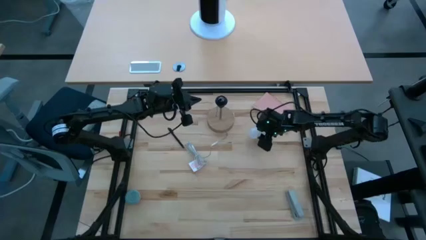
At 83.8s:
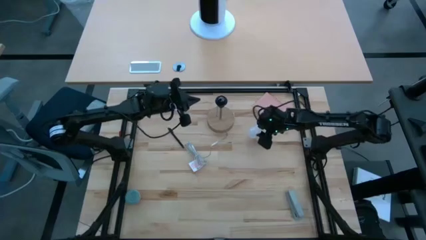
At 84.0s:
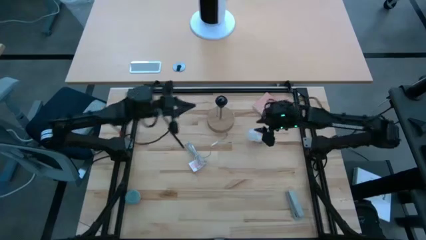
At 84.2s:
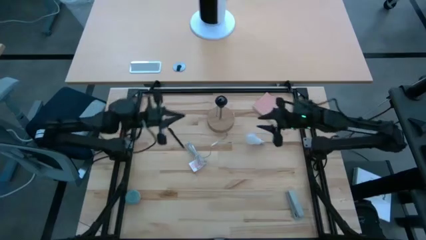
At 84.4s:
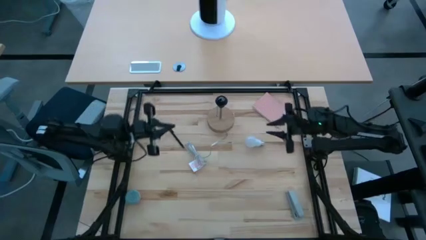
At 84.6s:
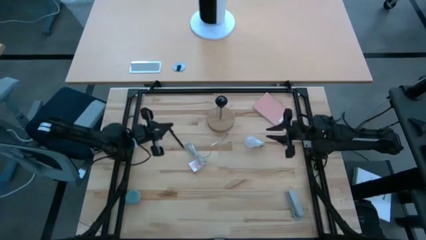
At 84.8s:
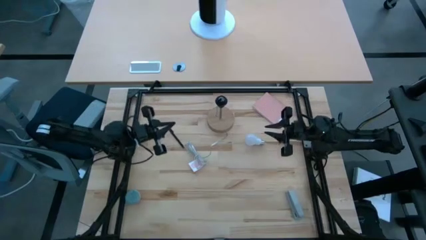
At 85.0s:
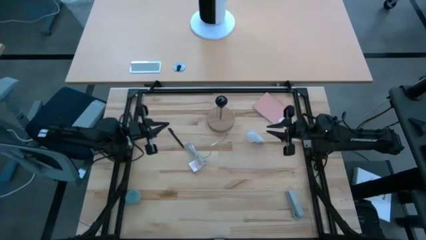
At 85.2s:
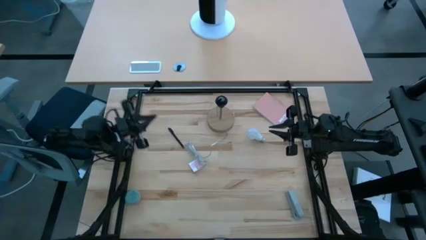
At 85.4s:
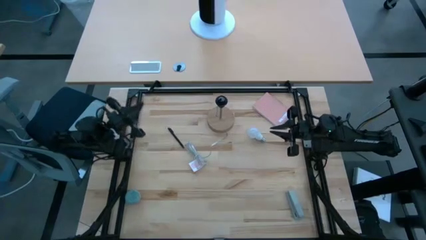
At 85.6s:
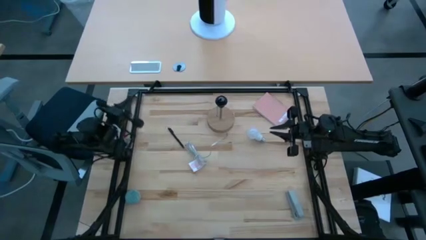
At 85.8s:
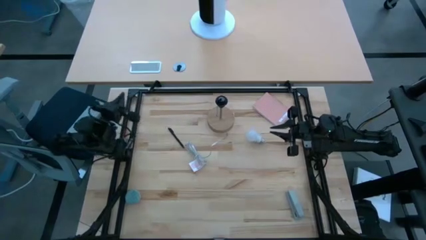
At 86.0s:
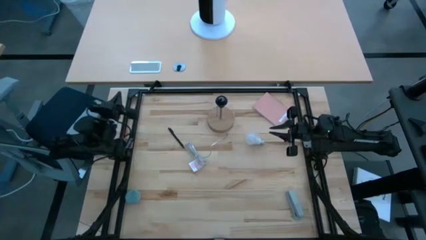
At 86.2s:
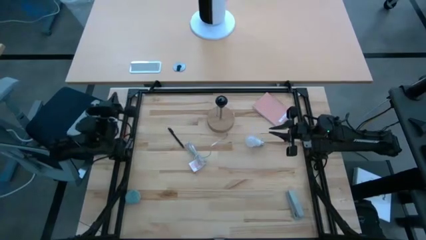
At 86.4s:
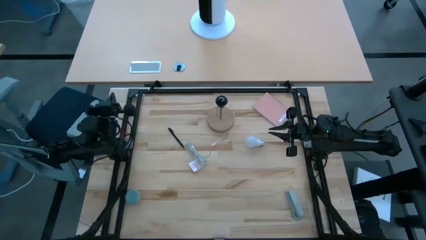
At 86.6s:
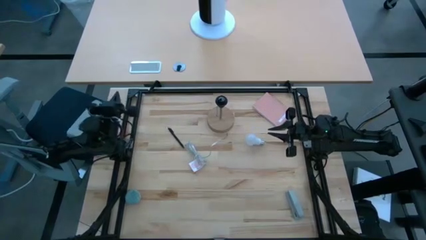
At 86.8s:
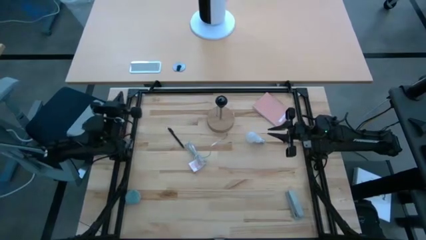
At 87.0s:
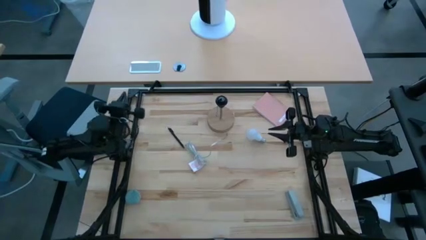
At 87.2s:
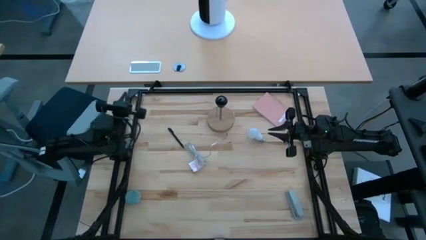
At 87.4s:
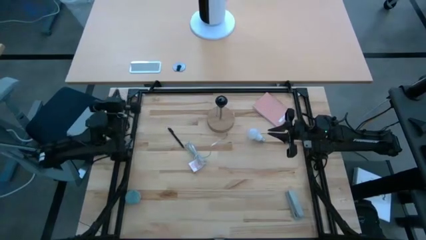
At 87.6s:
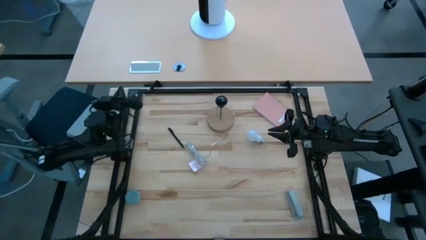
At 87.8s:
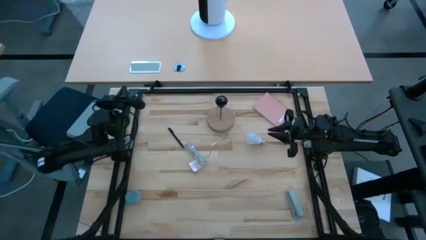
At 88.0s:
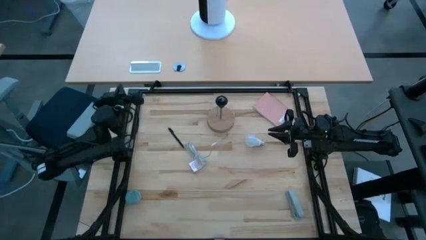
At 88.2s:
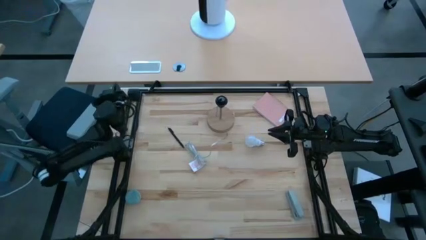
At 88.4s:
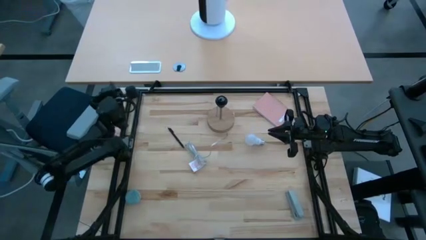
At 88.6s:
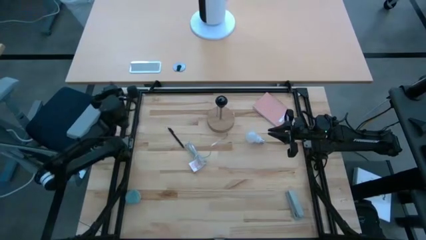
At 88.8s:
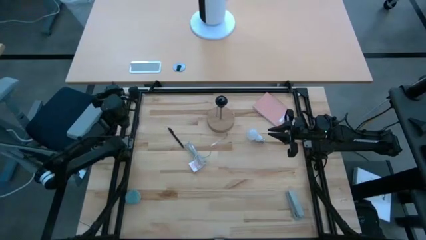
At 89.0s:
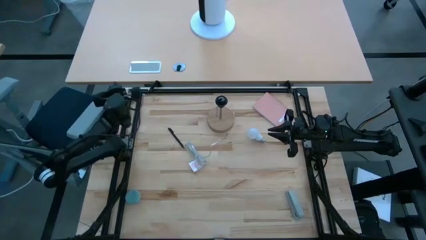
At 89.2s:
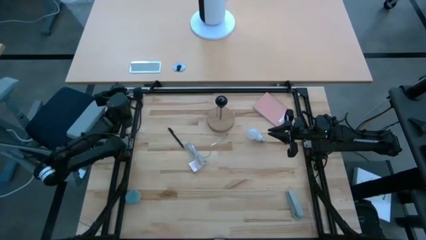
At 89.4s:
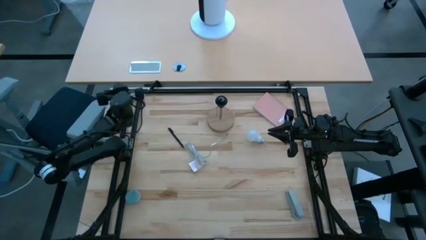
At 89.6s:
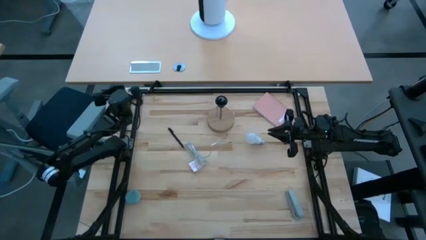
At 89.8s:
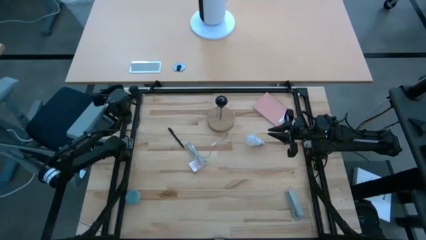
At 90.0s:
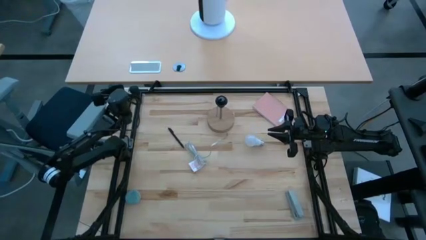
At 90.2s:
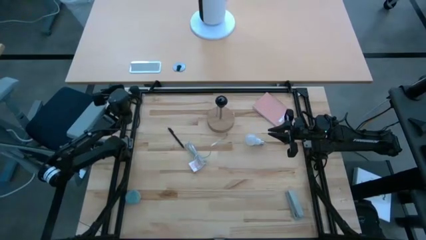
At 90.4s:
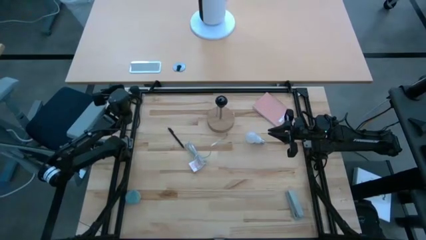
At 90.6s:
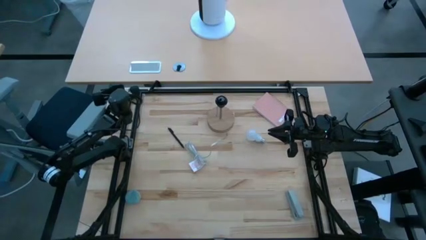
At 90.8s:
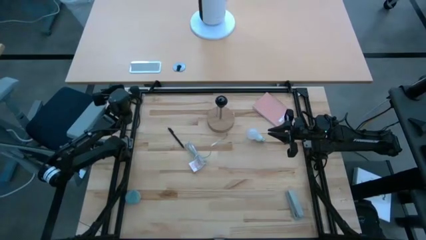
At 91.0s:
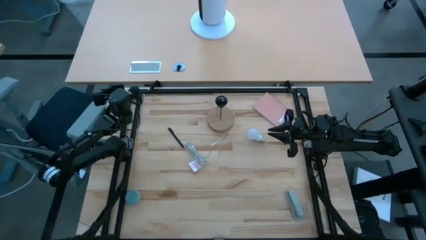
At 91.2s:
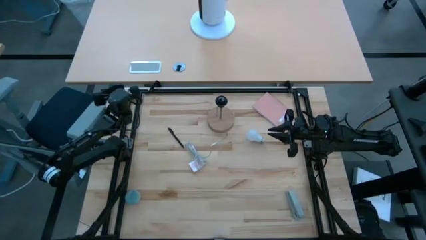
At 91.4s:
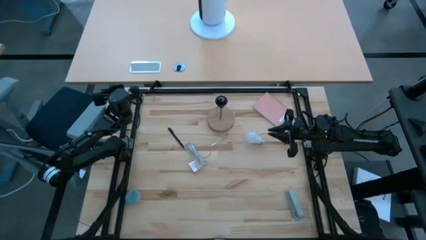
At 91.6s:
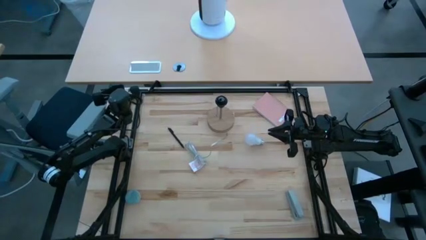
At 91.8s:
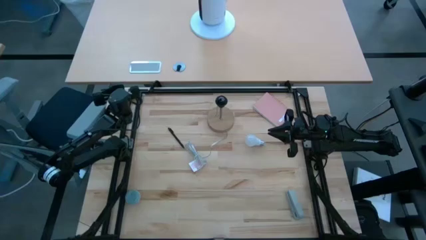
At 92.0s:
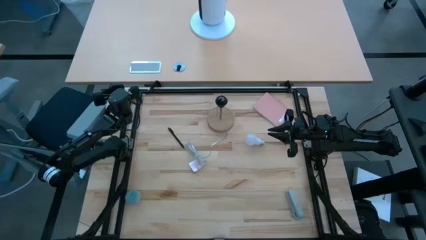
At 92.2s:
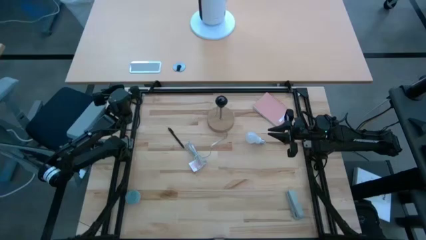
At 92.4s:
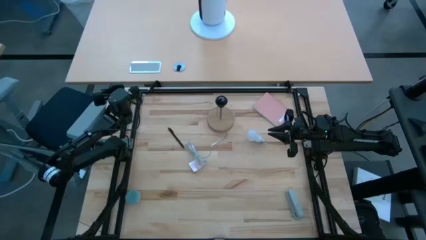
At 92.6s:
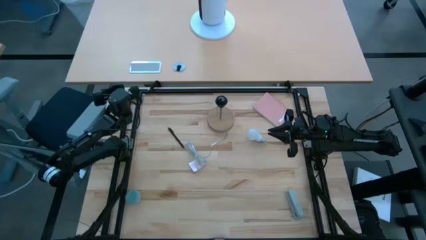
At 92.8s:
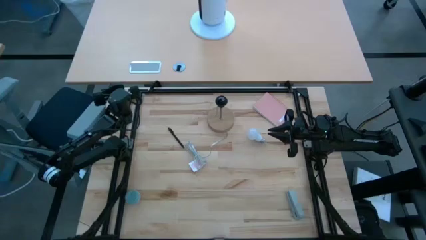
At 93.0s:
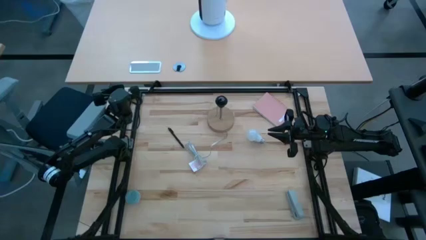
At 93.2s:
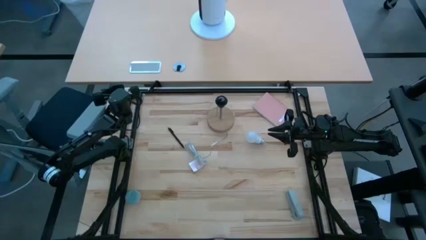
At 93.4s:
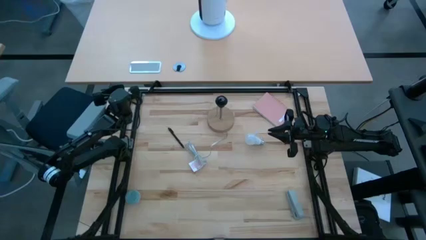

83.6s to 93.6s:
Task: Screw lightbulb
Return to Home Position

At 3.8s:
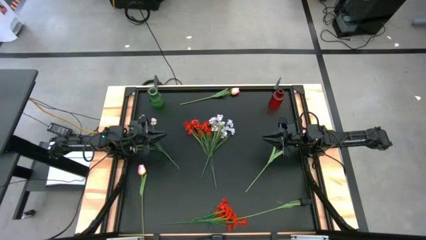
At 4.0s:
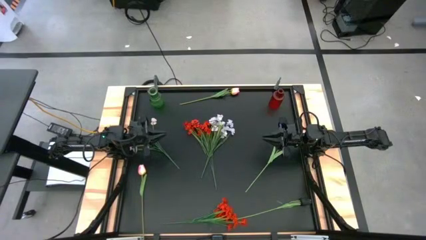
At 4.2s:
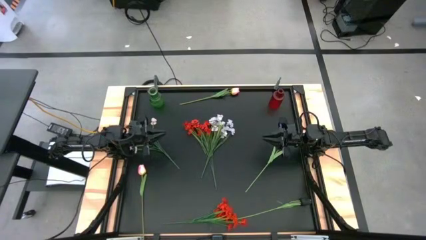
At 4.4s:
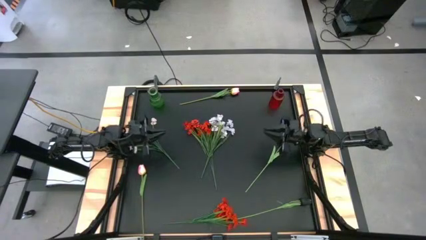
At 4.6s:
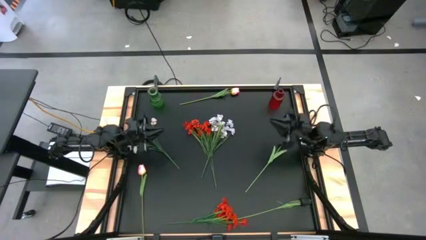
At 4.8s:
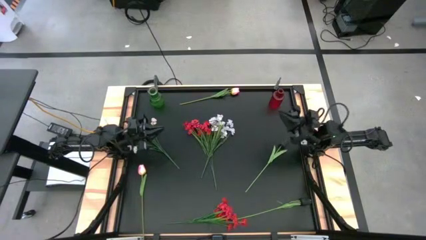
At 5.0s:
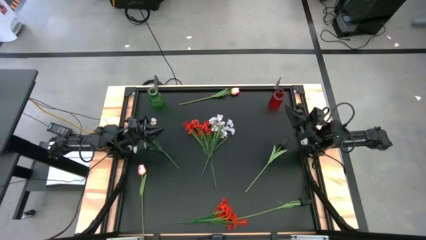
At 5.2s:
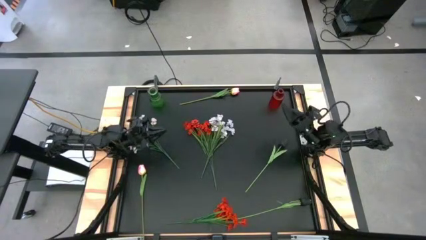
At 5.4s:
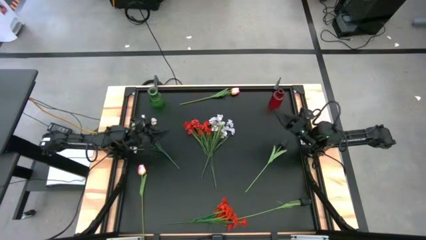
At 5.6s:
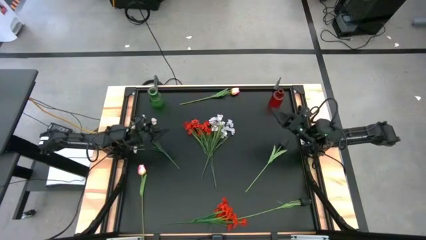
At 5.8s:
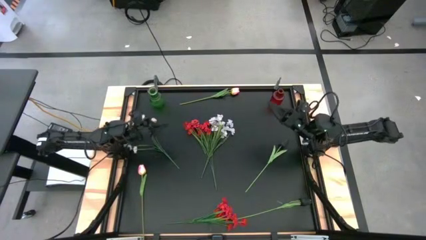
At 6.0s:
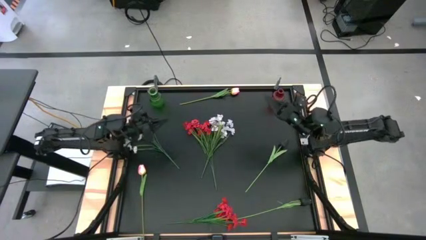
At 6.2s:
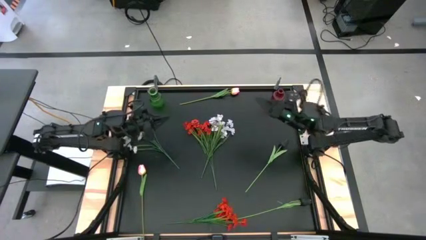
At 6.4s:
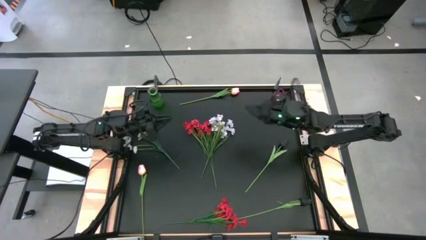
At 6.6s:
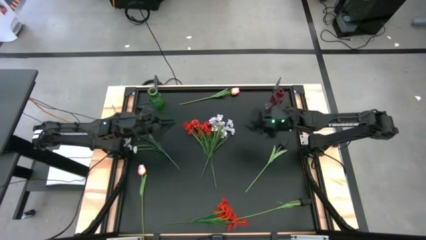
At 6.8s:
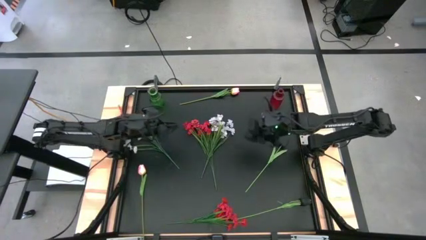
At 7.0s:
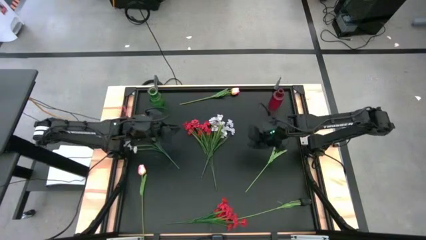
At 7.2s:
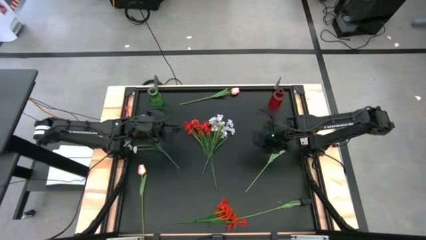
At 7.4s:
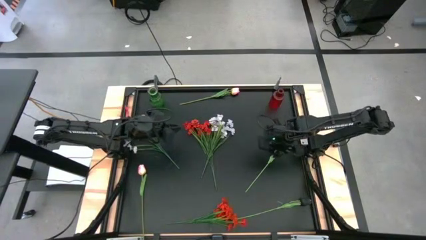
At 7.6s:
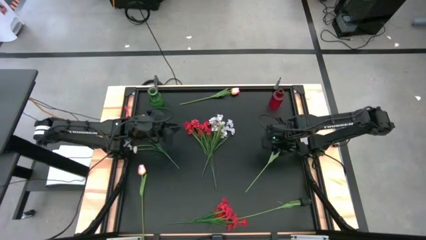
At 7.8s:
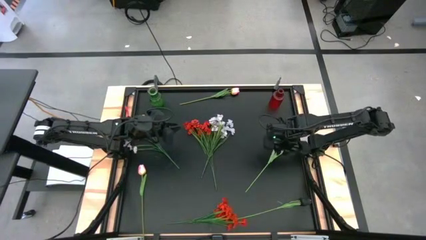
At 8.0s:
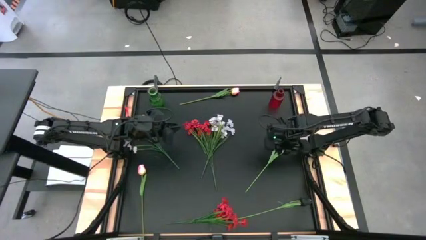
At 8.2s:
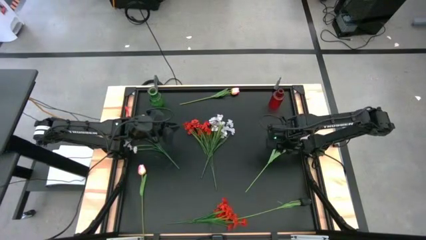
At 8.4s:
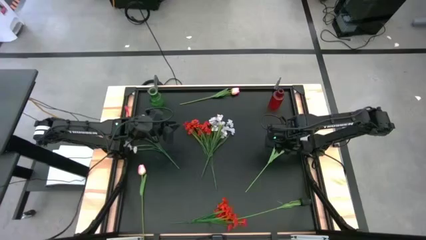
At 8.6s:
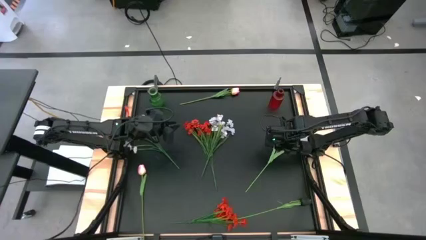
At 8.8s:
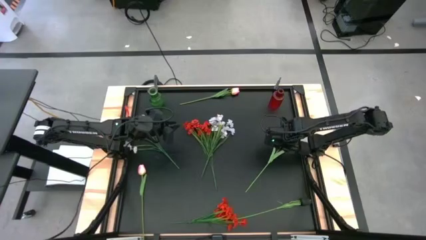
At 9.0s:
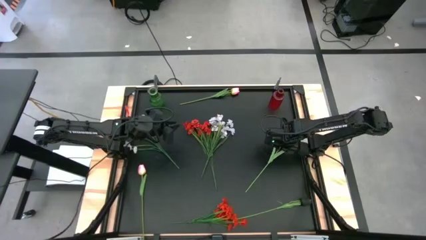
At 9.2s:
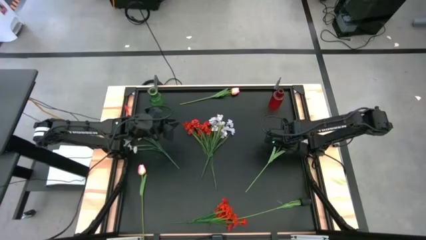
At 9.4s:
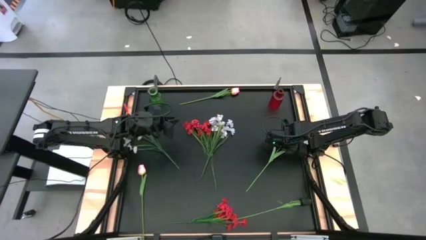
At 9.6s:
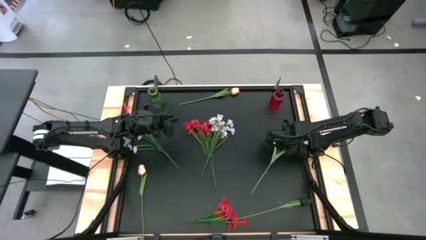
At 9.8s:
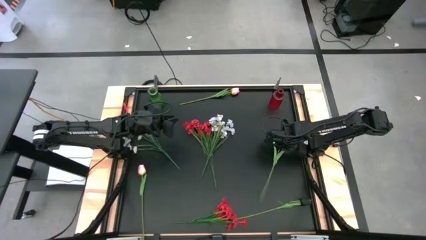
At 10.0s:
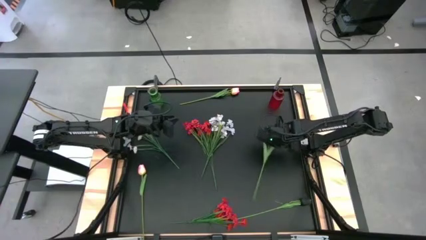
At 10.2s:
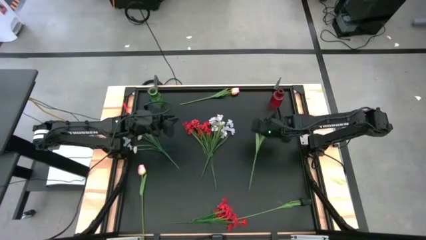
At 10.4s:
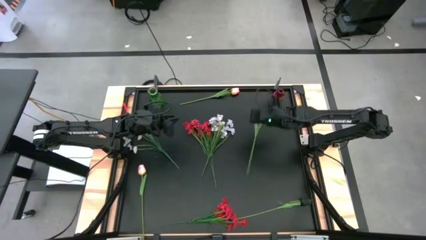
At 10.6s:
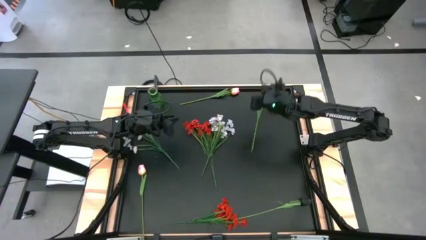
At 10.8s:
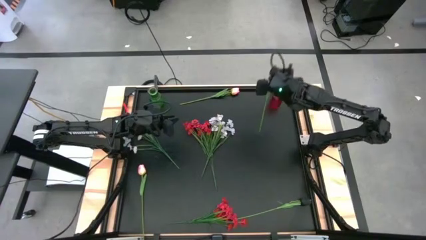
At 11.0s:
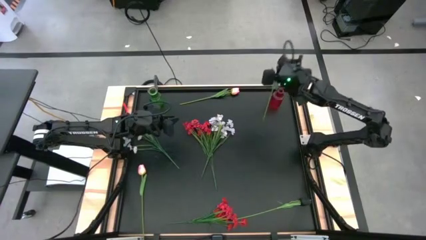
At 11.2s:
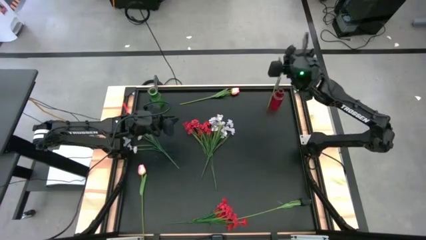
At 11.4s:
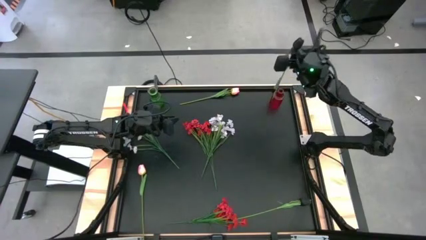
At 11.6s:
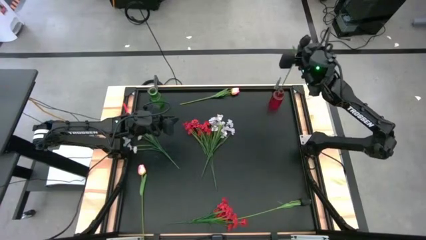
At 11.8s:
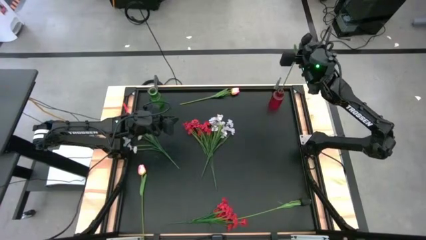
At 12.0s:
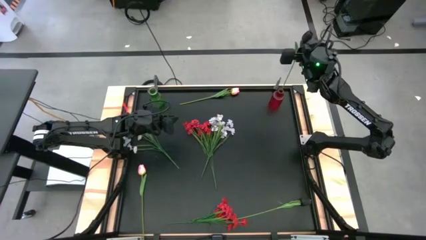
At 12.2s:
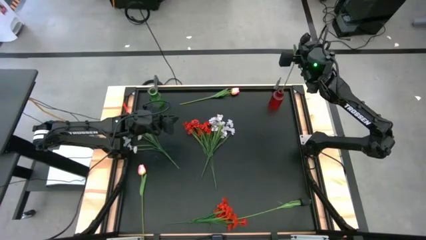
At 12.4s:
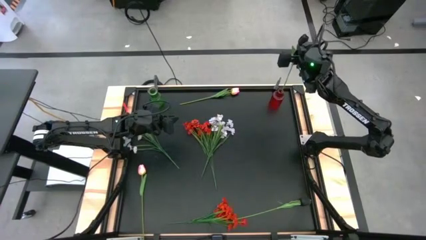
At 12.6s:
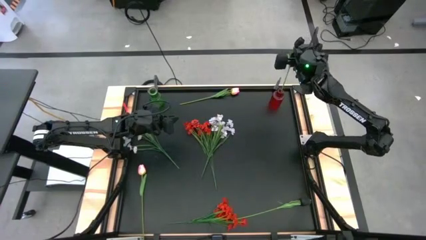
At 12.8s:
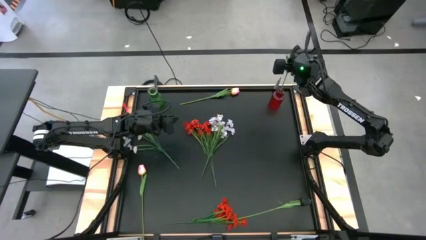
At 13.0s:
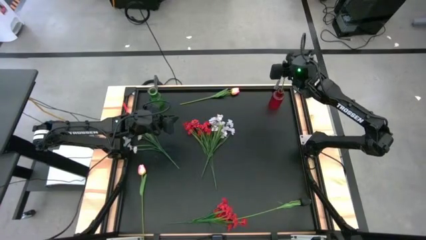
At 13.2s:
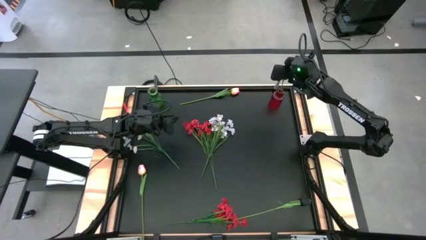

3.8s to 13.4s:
Task: Sort flowers into vase by color
Put the top black tulip into the red flower vase
